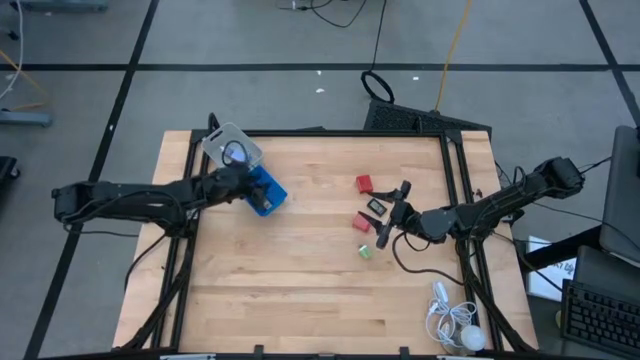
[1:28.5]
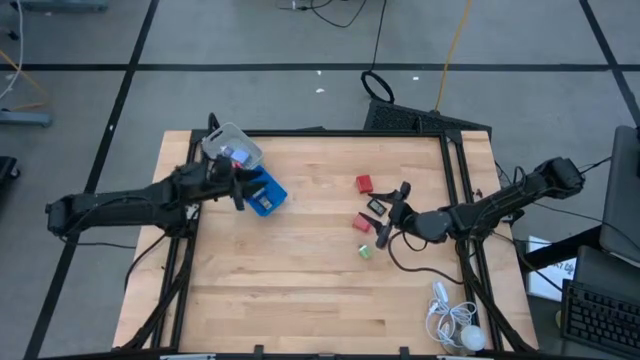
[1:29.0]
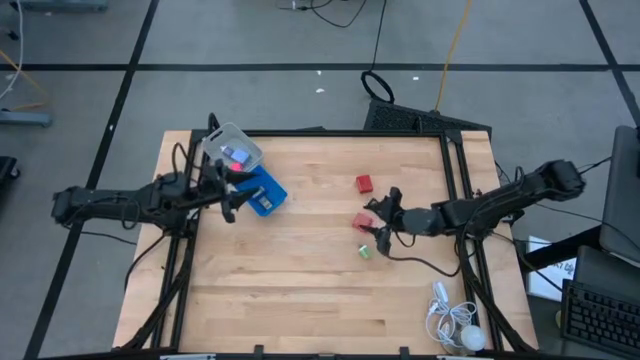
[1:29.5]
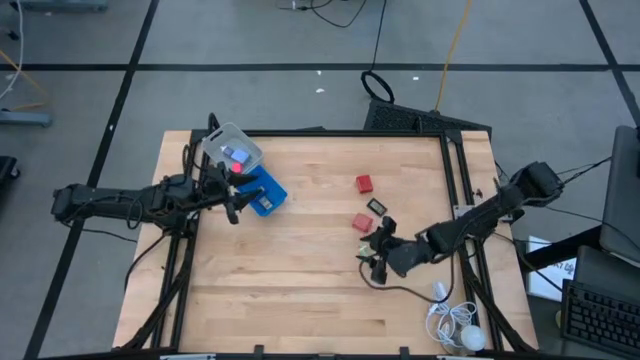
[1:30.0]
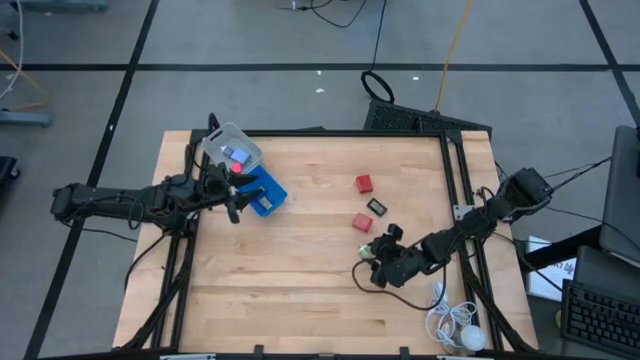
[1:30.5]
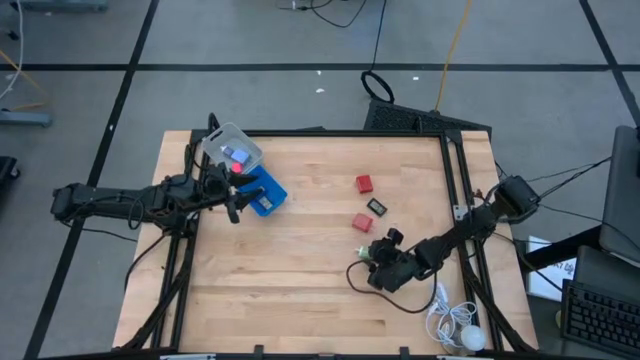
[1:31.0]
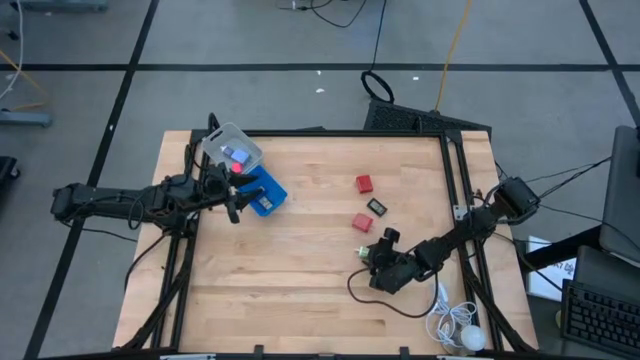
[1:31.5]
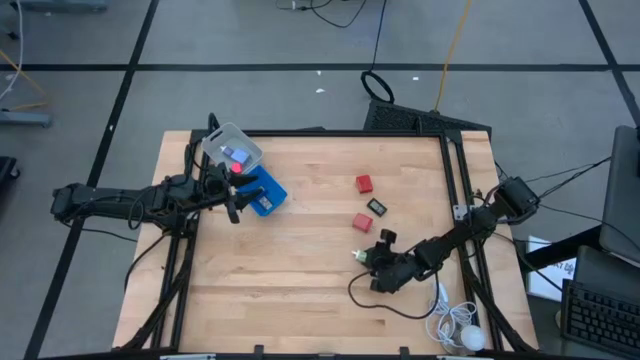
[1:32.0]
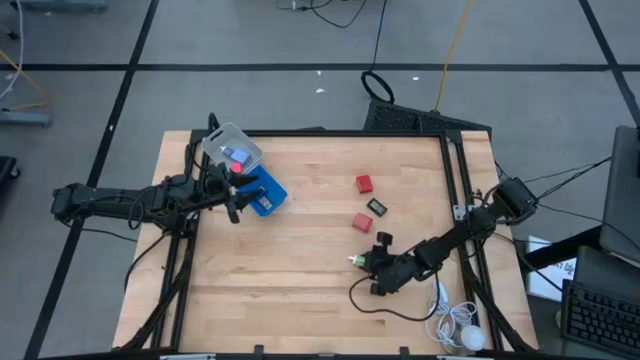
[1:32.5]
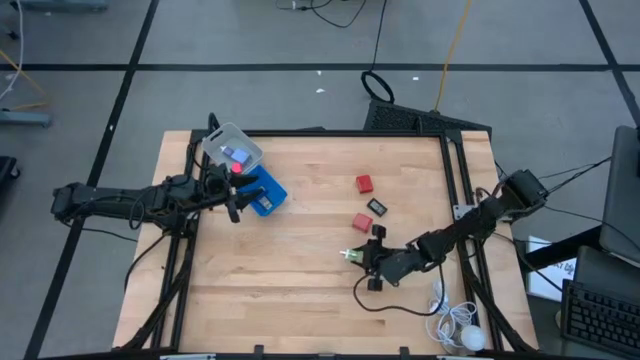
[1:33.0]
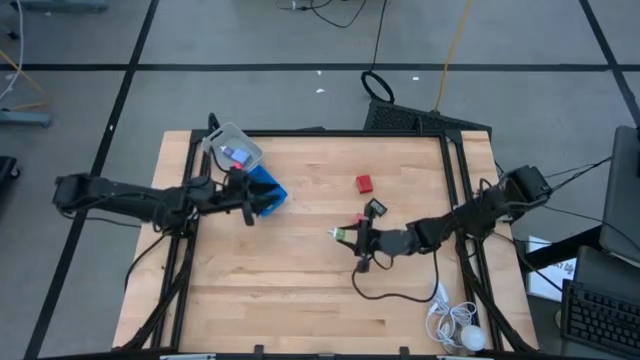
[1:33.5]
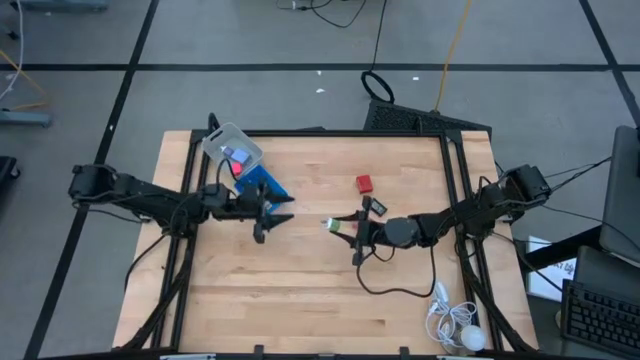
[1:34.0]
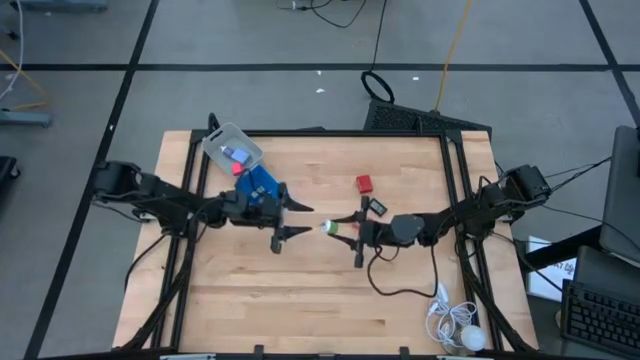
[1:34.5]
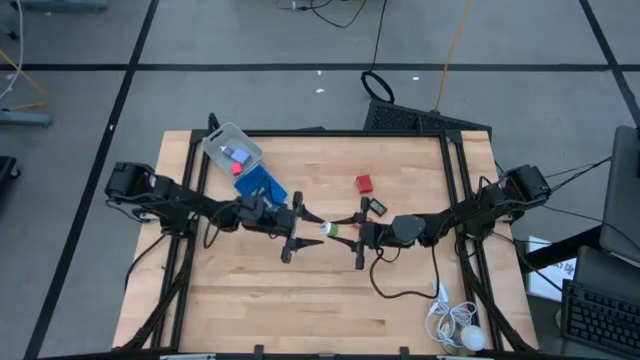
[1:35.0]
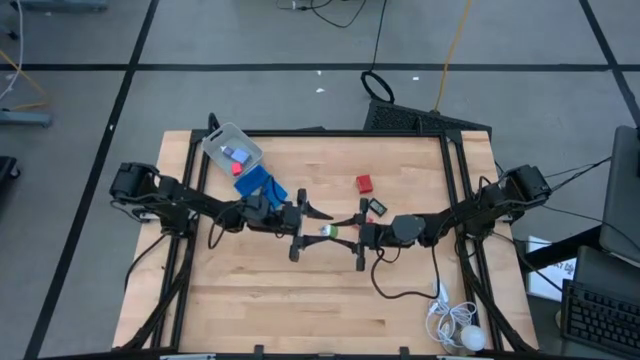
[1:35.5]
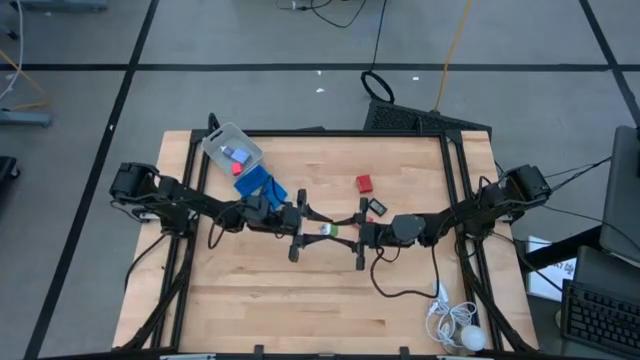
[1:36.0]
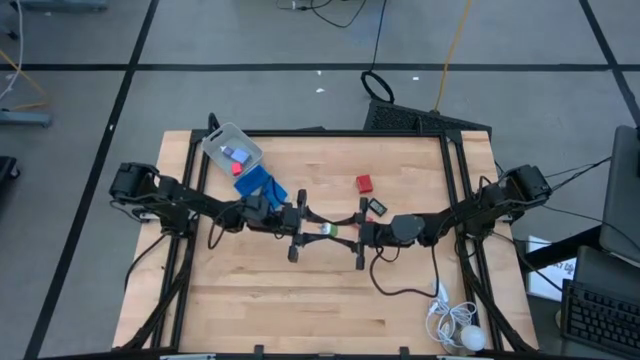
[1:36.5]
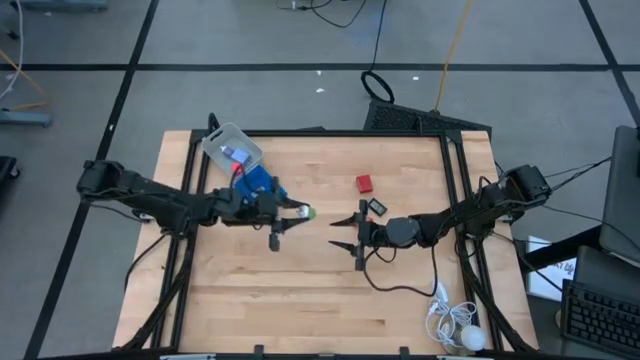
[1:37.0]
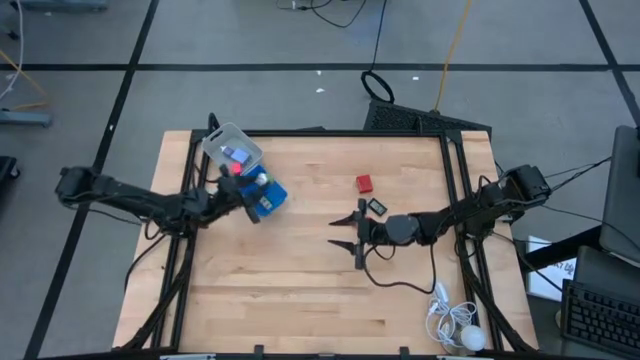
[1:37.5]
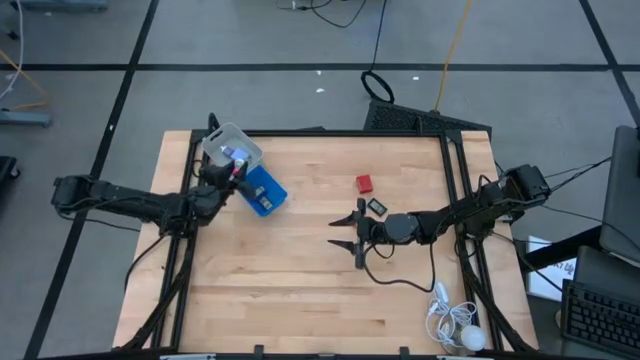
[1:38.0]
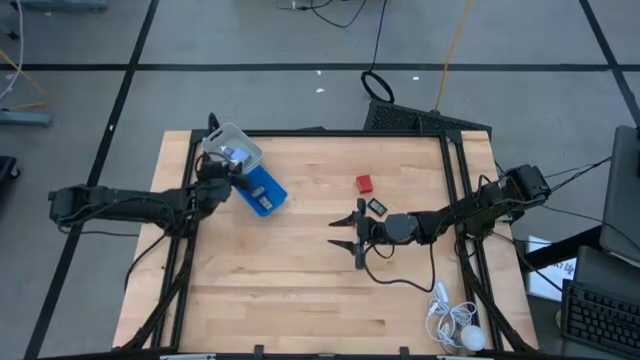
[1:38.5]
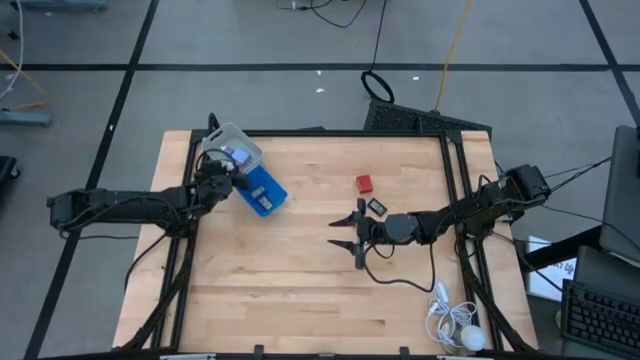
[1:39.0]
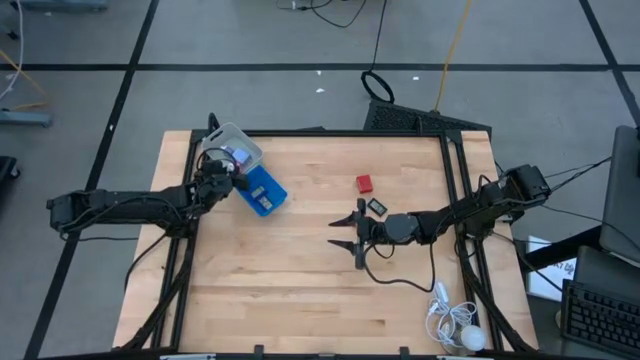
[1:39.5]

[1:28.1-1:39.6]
Task: Pick & Place Office items
Put the green charger adapter into the gray bin
